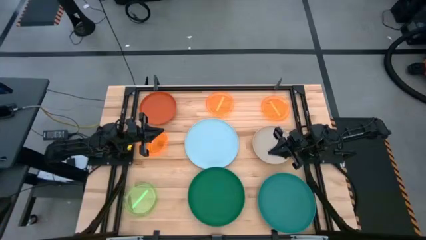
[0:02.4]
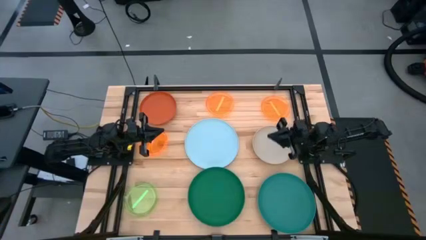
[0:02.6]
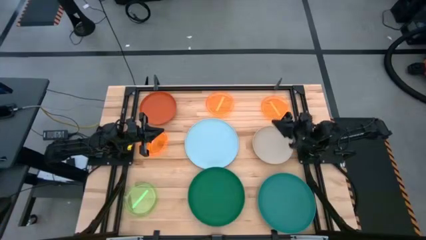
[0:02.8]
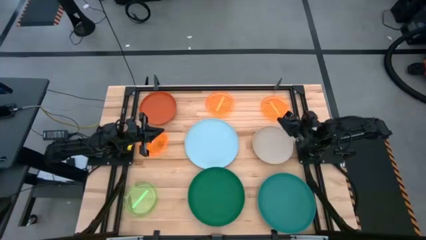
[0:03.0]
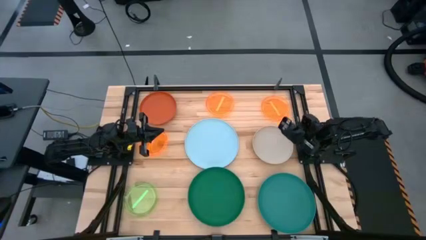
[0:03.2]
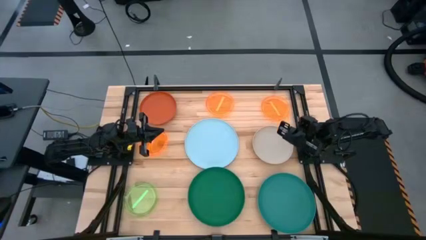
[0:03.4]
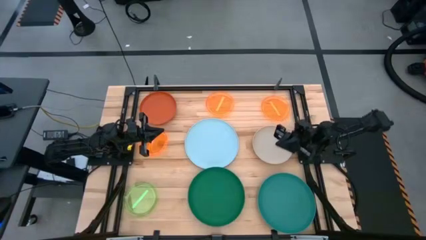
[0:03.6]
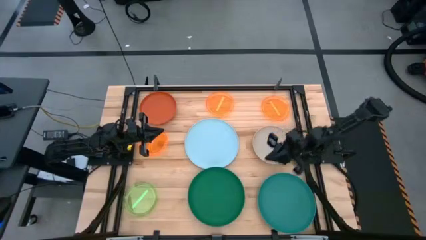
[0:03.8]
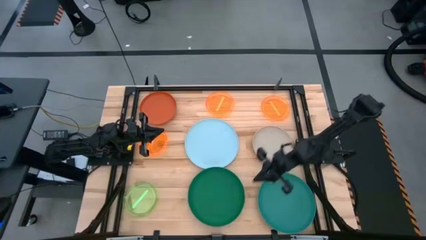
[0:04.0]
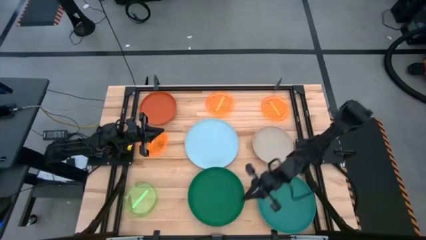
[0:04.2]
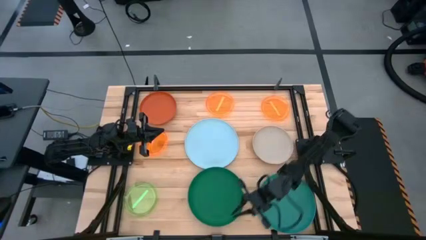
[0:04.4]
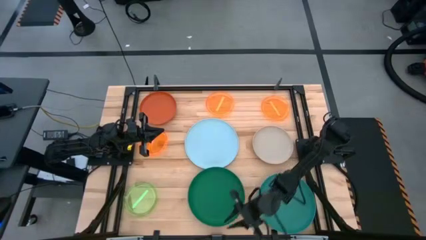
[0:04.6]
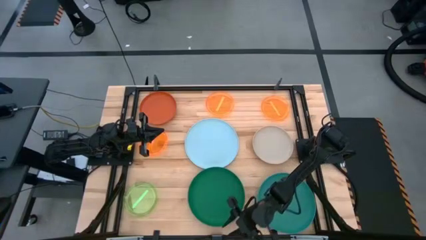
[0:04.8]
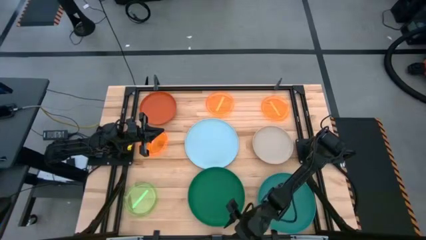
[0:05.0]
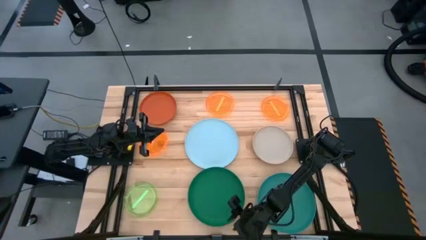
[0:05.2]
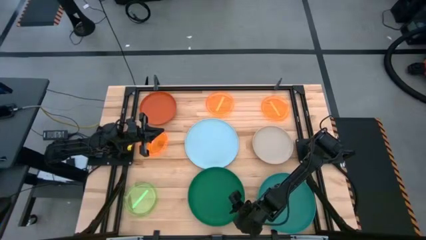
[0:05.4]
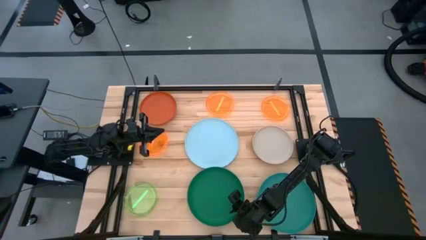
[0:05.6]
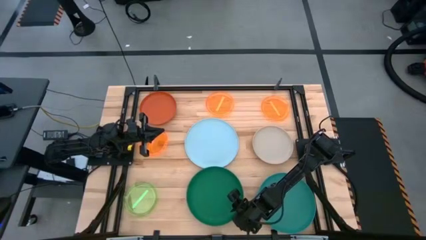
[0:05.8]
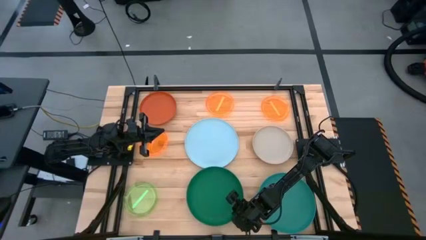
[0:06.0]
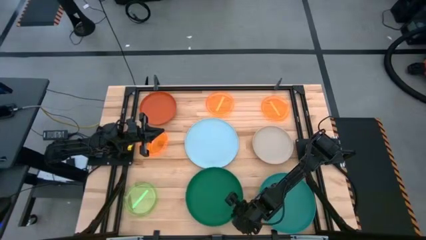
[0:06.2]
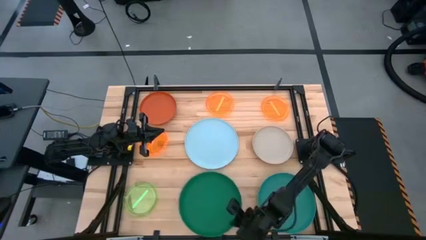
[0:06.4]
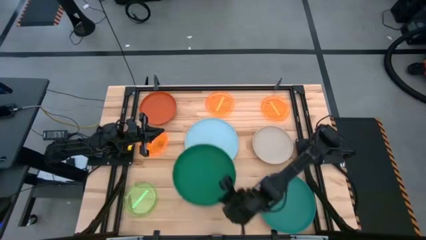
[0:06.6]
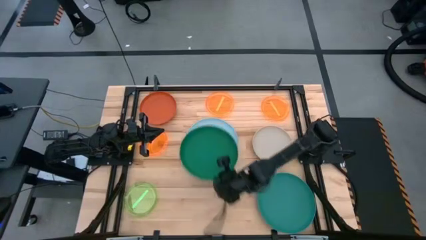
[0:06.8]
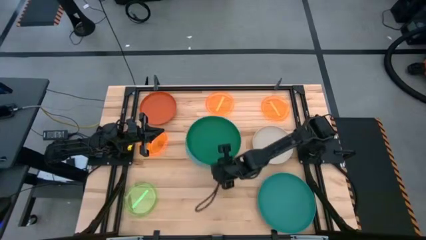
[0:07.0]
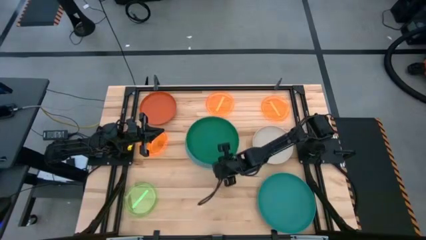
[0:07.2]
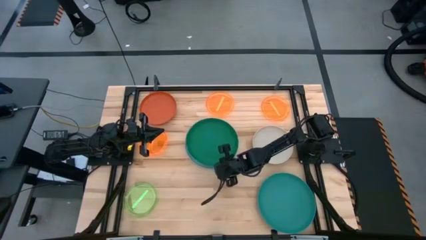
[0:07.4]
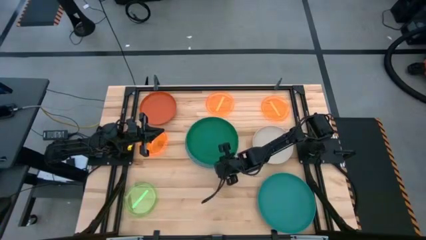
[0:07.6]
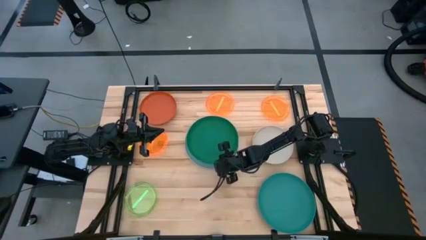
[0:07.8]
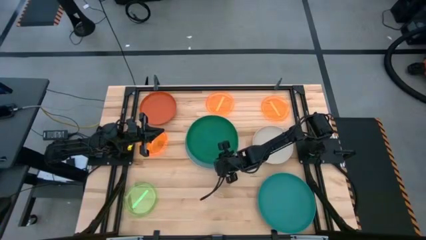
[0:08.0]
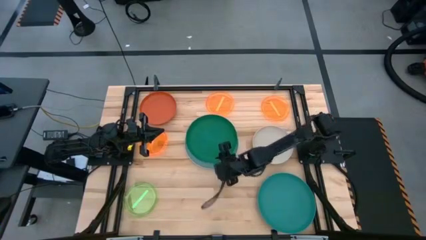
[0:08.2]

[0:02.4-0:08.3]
Task: Stack plastic plates
Stack the dark green plate on top of the blue plate

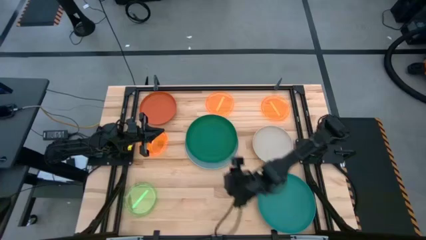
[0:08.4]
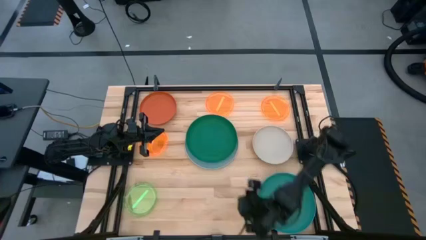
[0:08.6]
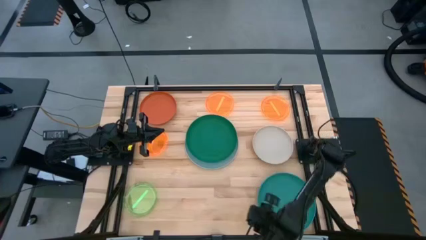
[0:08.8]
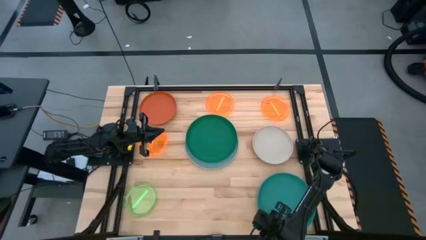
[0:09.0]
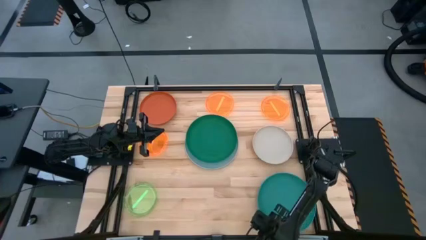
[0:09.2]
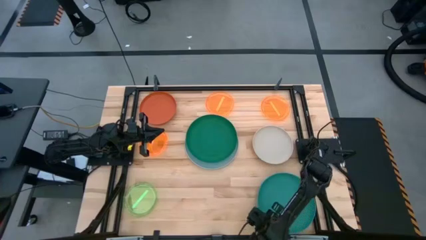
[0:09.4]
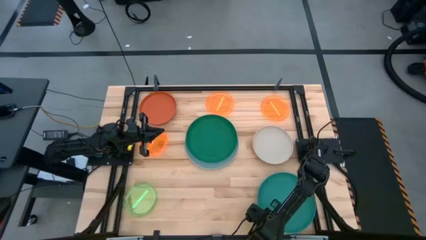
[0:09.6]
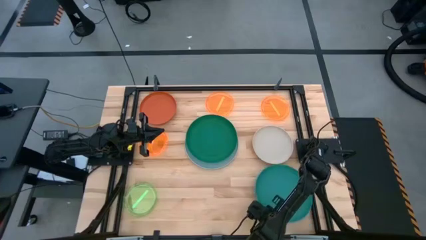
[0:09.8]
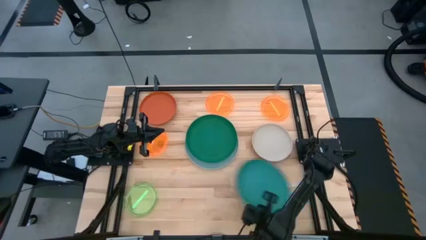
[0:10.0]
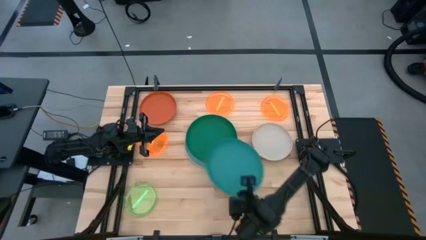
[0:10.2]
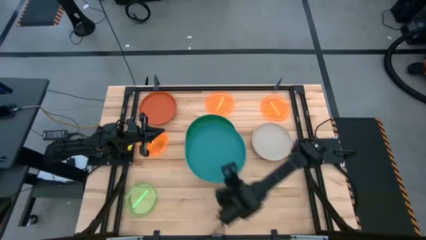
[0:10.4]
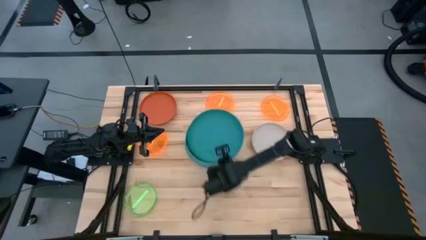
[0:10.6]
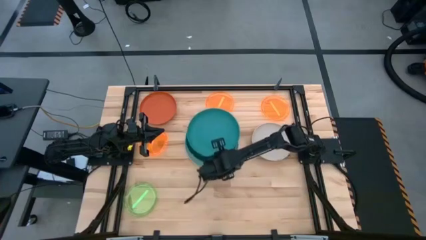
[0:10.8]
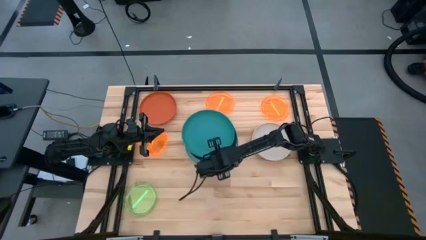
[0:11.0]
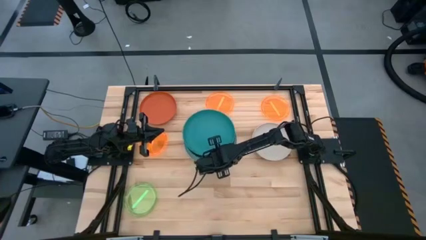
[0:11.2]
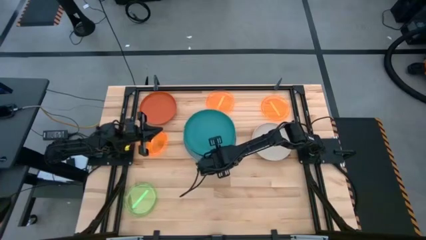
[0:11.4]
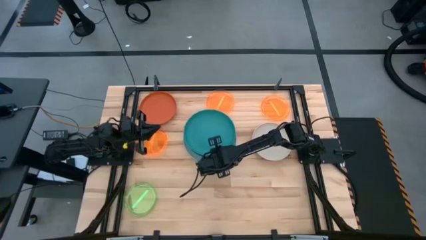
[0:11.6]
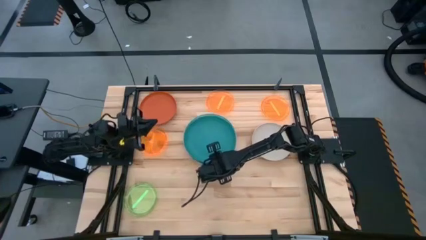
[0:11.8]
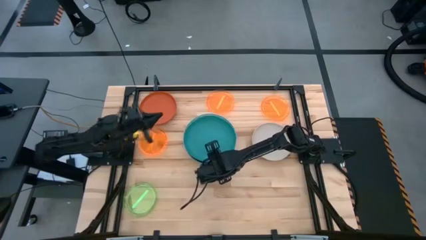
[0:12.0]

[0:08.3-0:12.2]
Stack the green plate on top of the dark green plate

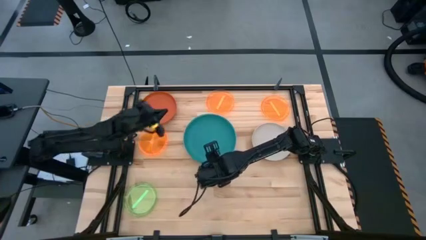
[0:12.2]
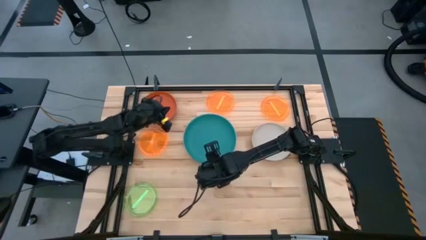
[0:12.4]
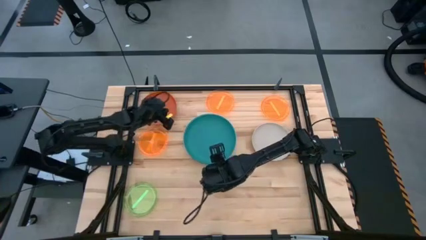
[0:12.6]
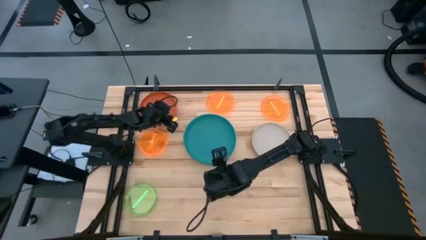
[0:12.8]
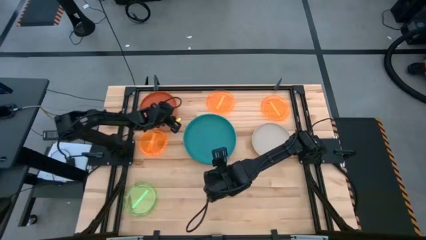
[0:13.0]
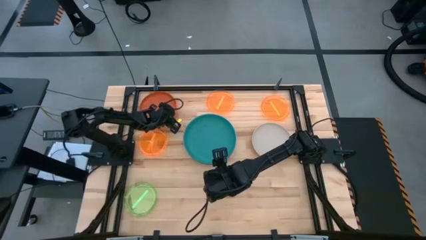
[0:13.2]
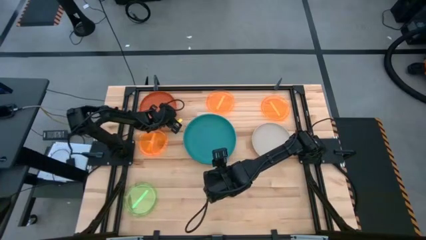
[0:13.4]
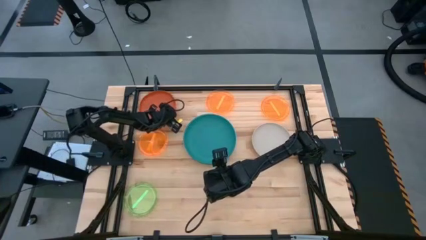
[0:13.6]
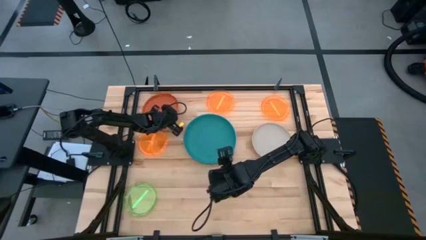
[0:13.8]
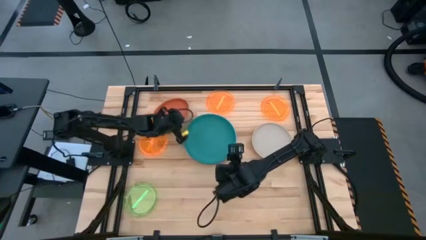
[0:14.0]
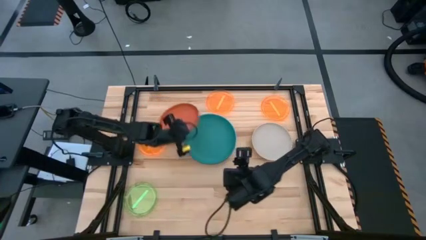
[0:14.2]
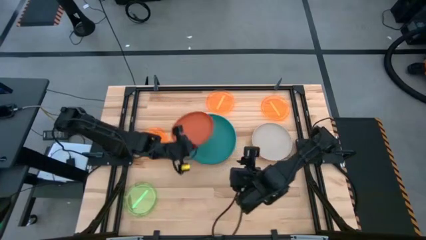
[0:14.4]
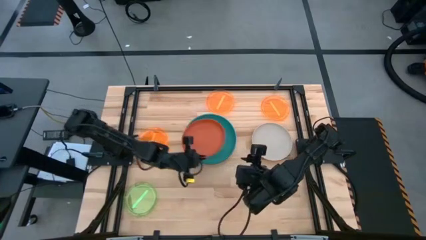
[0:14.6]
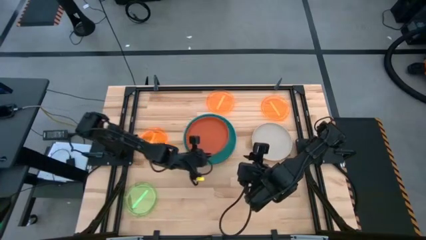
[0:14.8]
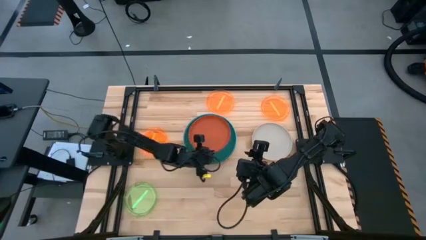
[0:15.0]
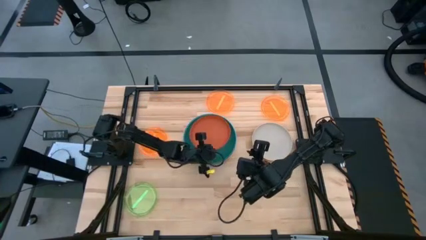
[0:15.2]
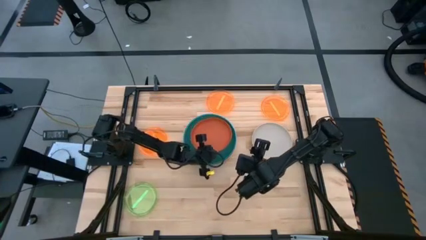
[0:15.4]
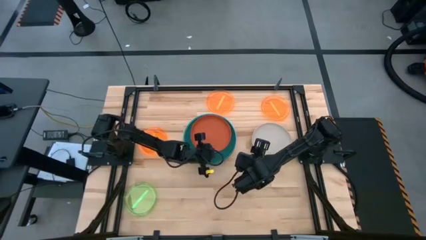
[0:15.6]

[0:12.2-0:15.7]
Stack the orange plate on top of the green plate

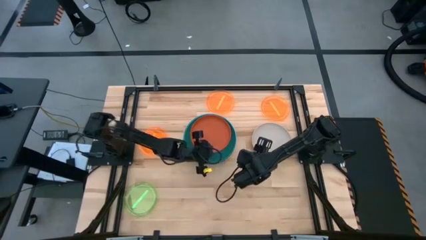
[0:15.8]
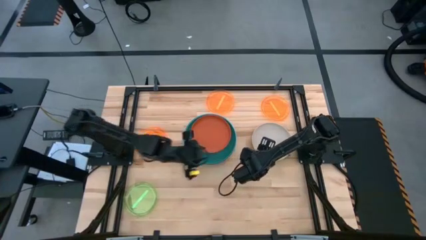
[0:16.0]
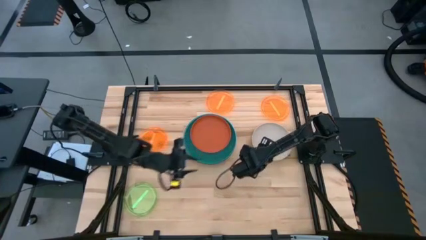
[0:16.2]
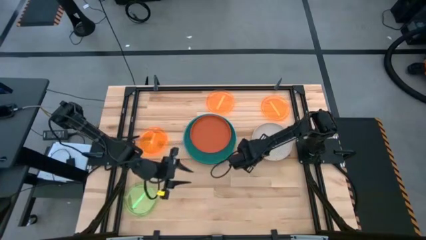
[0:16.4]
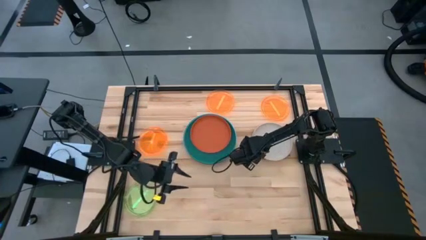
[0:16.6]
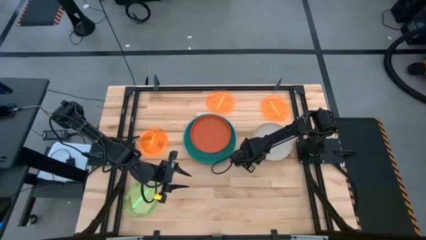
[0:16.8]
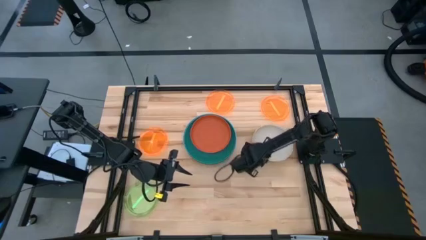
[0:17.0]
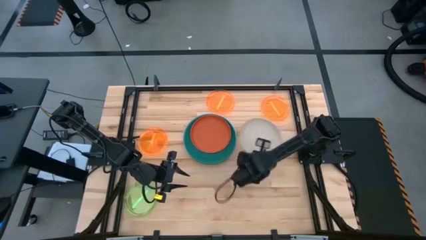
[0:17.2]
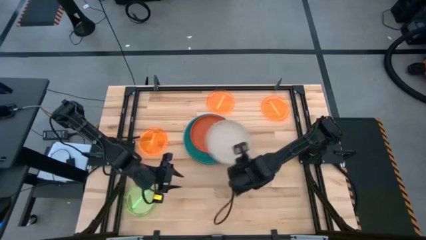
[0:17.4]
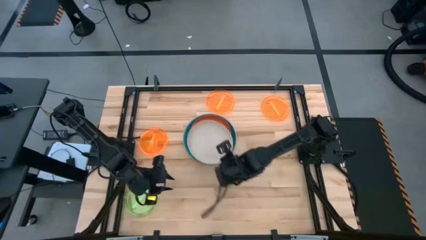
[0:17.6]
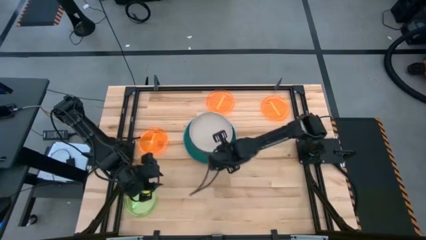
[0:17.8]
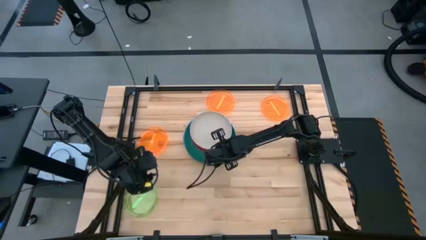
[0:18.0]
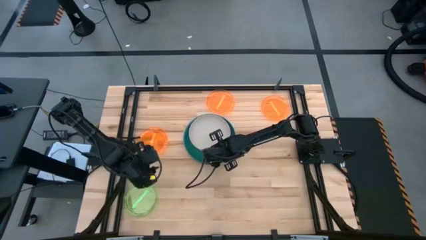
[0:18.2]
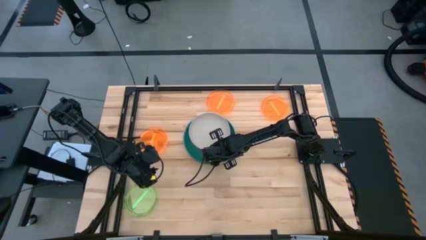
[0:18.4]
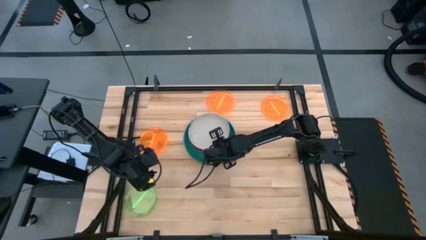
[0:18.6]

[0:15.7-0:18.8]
Stack the white plate on top of the orange plate
